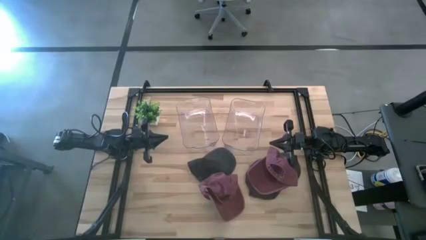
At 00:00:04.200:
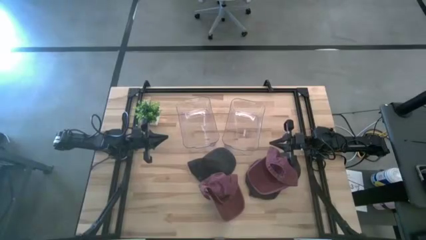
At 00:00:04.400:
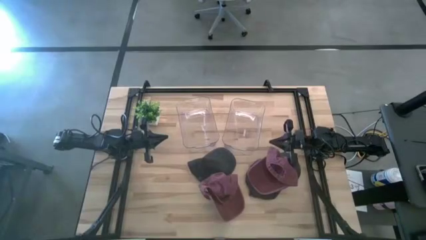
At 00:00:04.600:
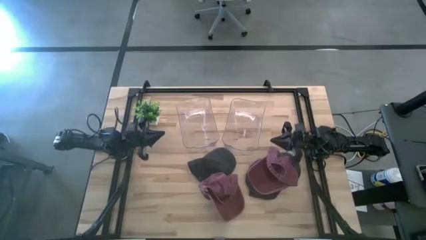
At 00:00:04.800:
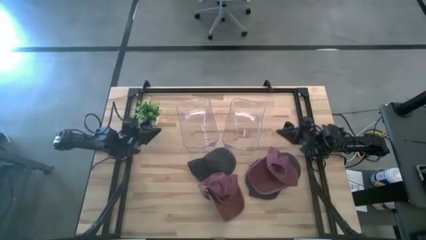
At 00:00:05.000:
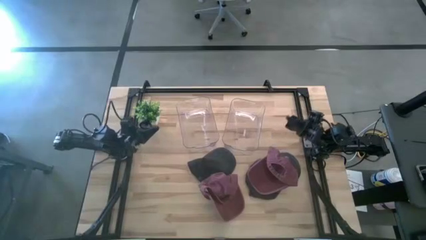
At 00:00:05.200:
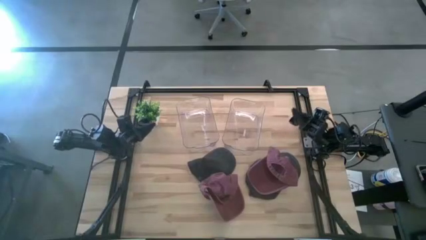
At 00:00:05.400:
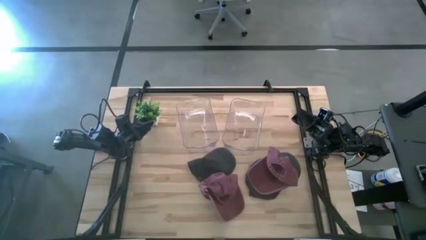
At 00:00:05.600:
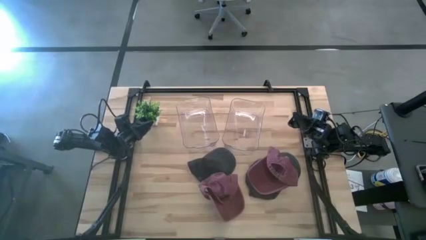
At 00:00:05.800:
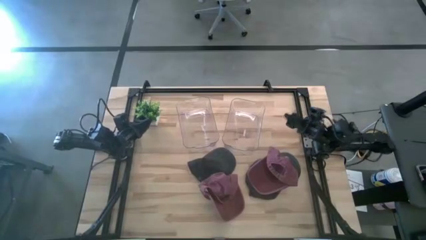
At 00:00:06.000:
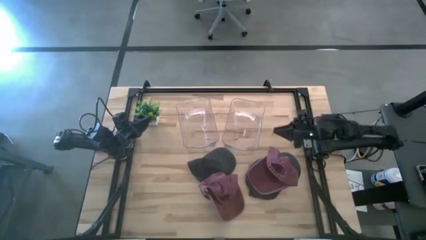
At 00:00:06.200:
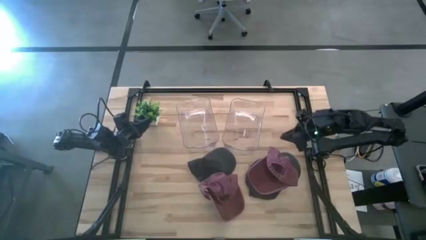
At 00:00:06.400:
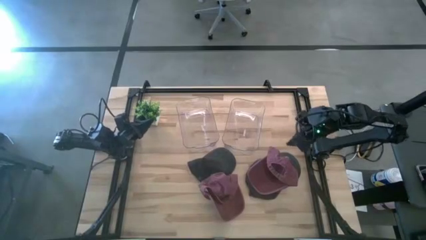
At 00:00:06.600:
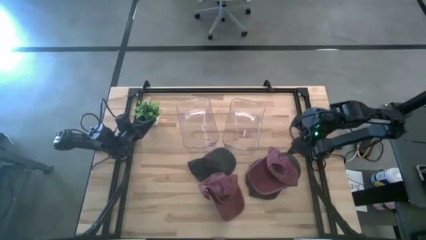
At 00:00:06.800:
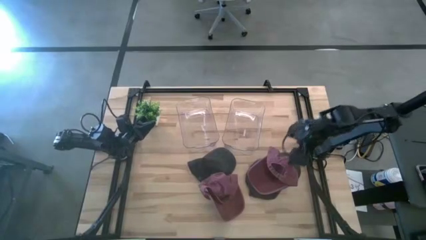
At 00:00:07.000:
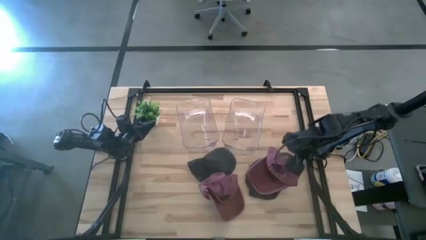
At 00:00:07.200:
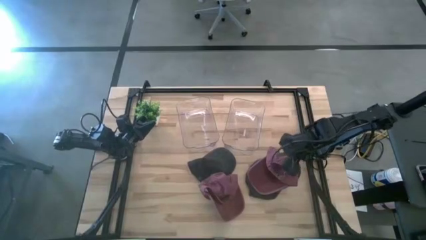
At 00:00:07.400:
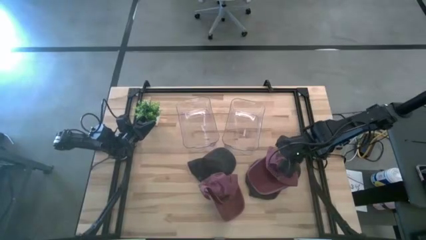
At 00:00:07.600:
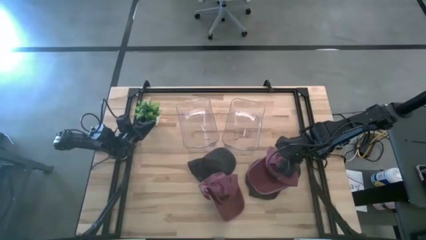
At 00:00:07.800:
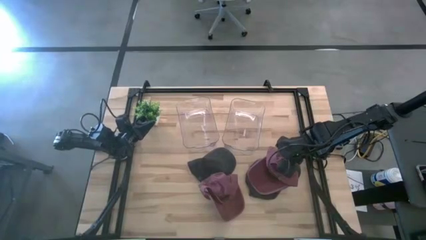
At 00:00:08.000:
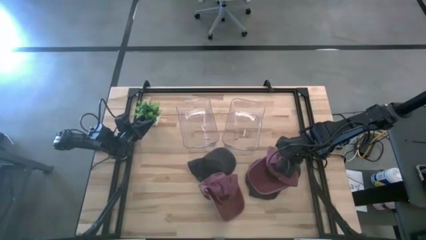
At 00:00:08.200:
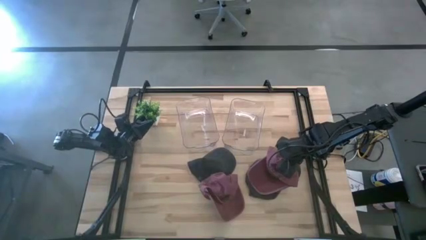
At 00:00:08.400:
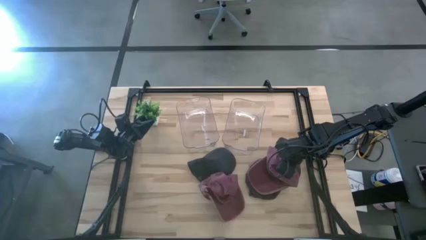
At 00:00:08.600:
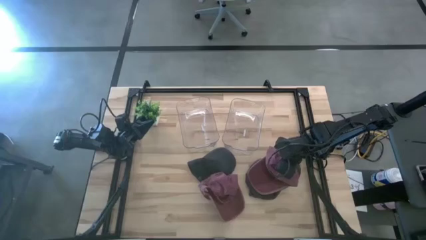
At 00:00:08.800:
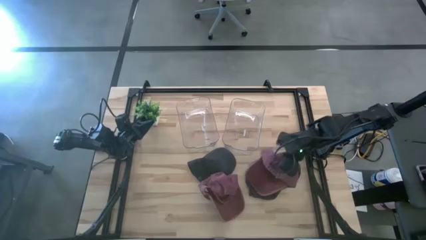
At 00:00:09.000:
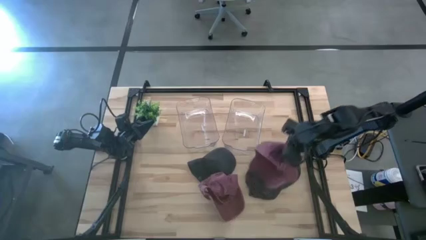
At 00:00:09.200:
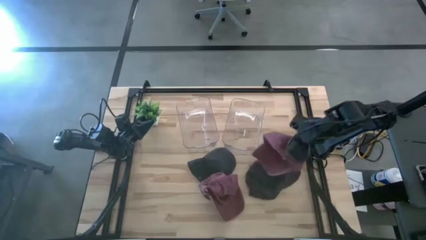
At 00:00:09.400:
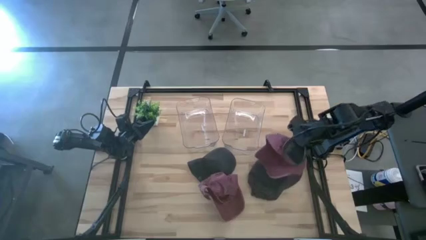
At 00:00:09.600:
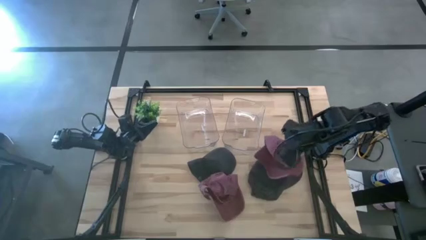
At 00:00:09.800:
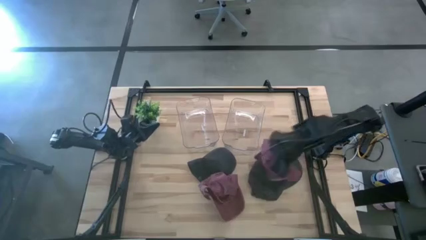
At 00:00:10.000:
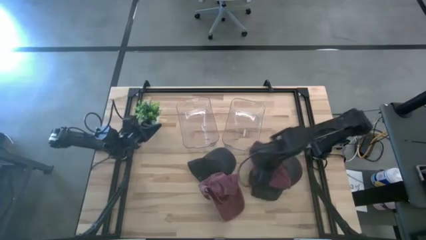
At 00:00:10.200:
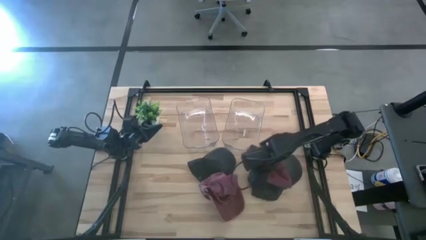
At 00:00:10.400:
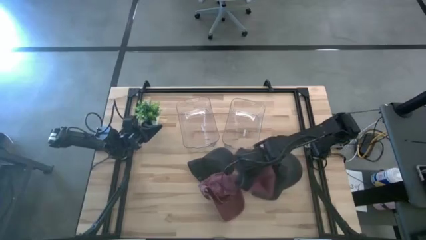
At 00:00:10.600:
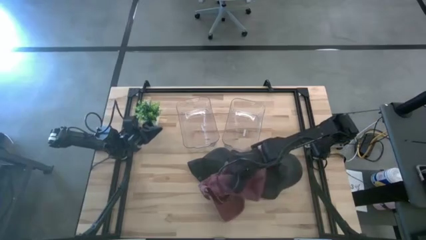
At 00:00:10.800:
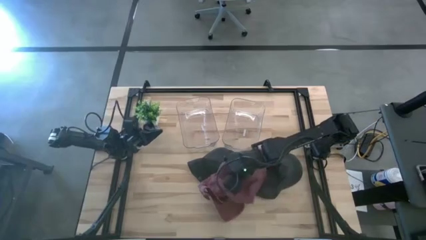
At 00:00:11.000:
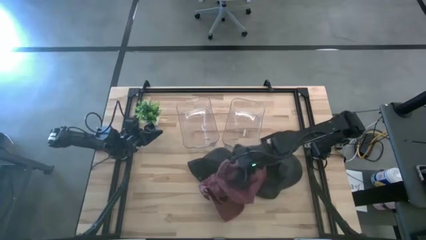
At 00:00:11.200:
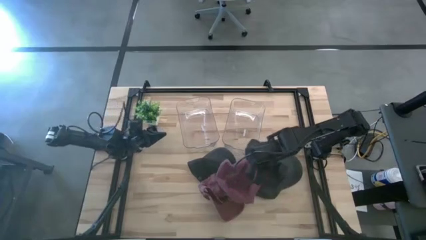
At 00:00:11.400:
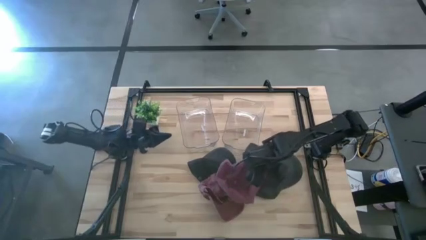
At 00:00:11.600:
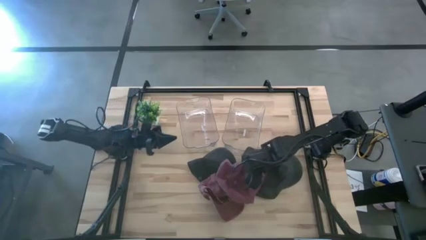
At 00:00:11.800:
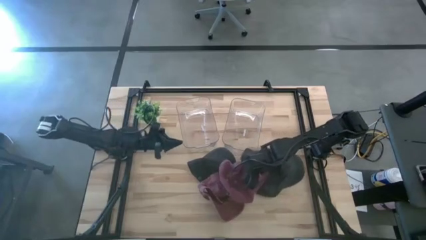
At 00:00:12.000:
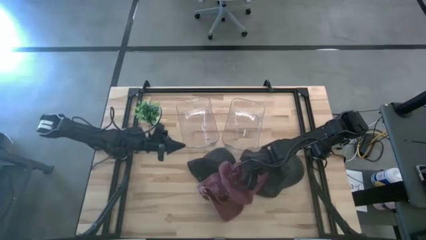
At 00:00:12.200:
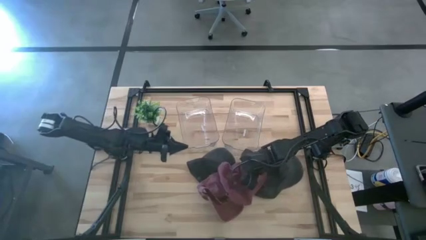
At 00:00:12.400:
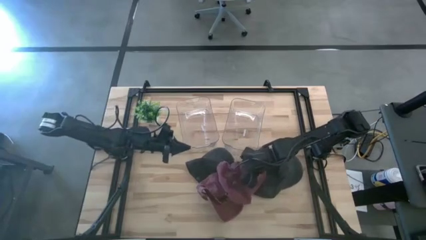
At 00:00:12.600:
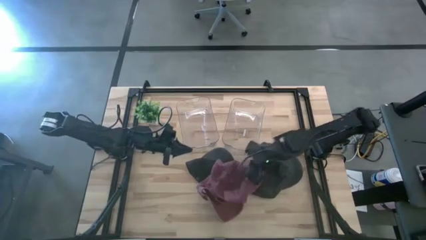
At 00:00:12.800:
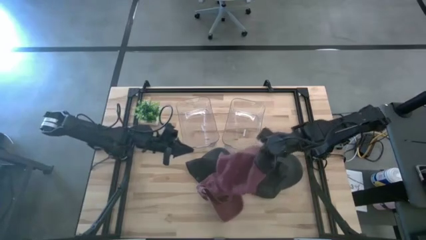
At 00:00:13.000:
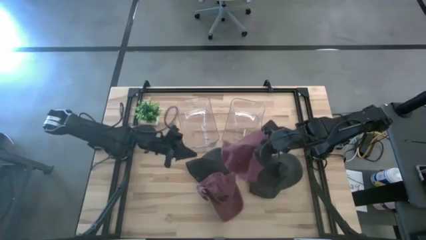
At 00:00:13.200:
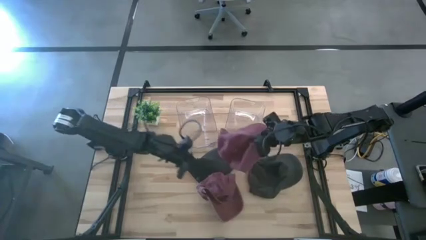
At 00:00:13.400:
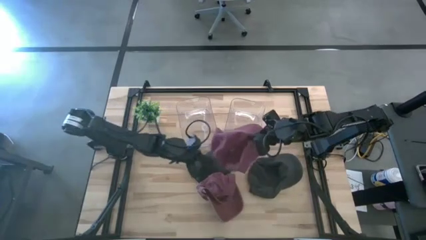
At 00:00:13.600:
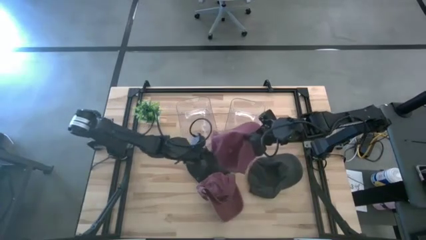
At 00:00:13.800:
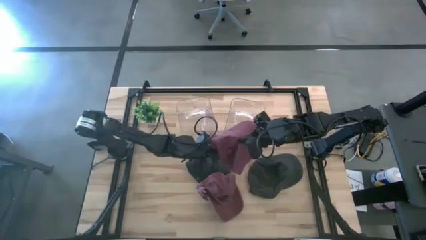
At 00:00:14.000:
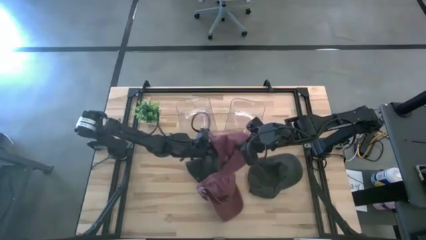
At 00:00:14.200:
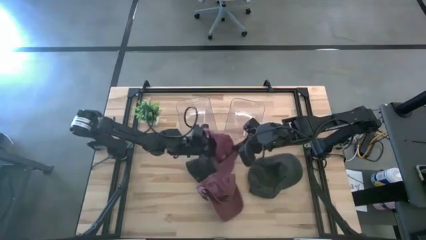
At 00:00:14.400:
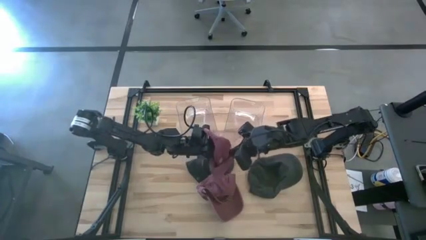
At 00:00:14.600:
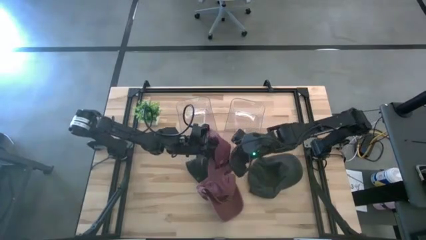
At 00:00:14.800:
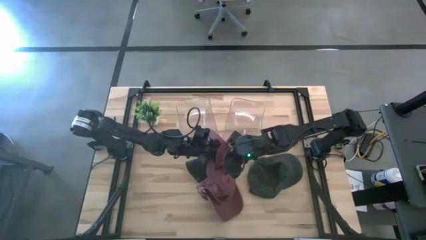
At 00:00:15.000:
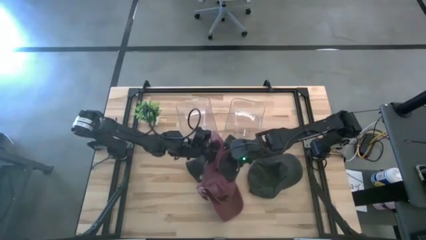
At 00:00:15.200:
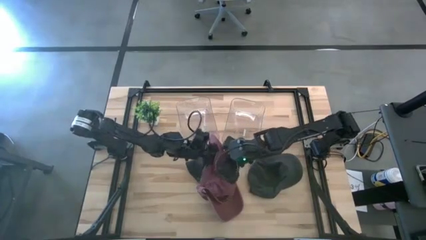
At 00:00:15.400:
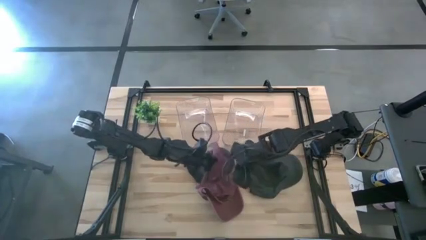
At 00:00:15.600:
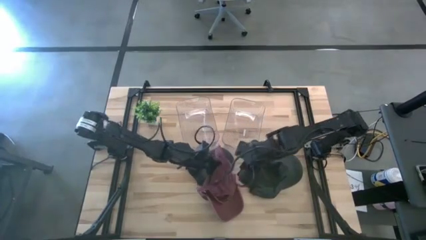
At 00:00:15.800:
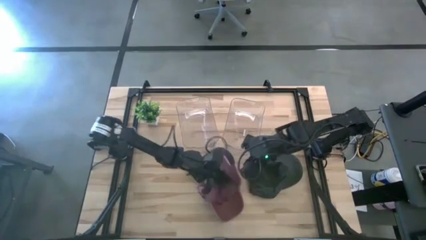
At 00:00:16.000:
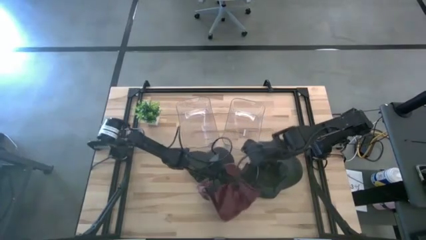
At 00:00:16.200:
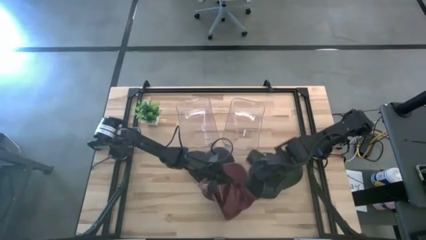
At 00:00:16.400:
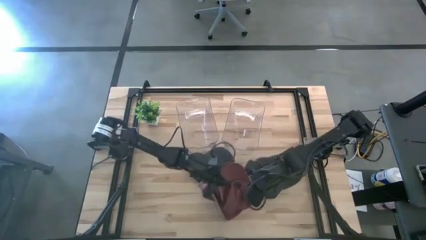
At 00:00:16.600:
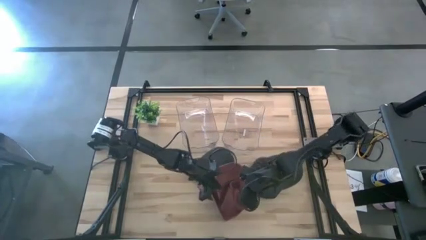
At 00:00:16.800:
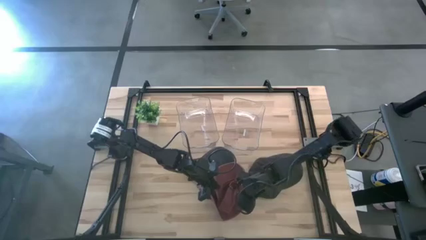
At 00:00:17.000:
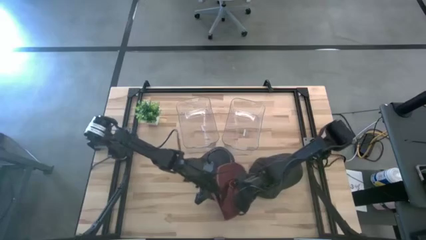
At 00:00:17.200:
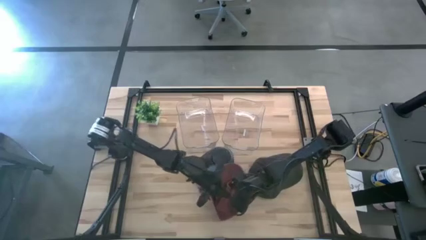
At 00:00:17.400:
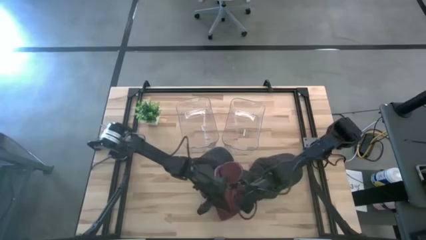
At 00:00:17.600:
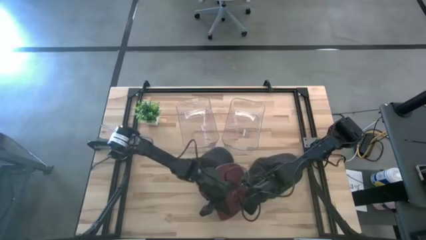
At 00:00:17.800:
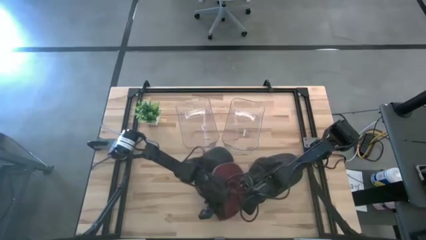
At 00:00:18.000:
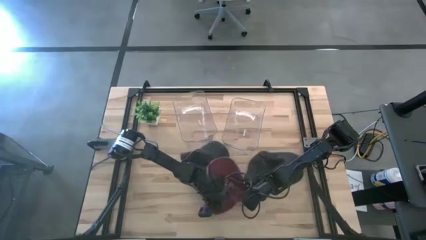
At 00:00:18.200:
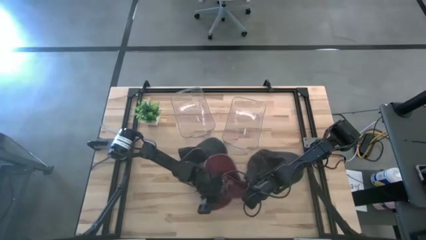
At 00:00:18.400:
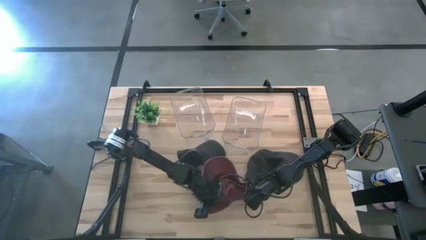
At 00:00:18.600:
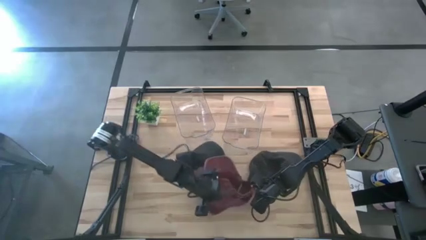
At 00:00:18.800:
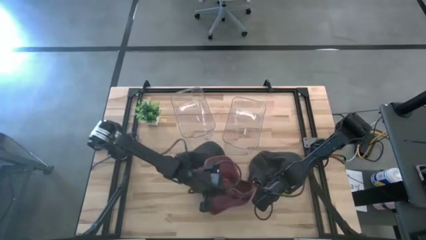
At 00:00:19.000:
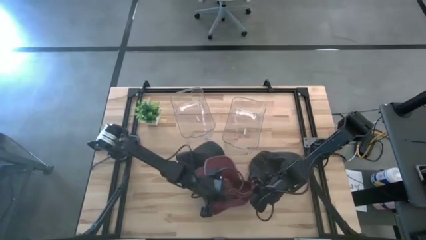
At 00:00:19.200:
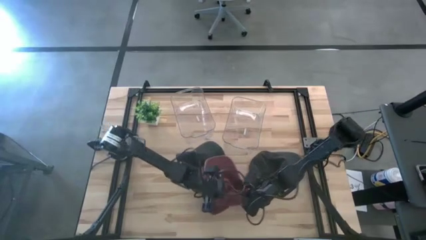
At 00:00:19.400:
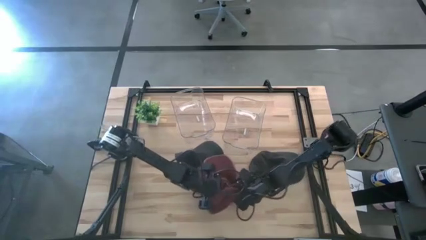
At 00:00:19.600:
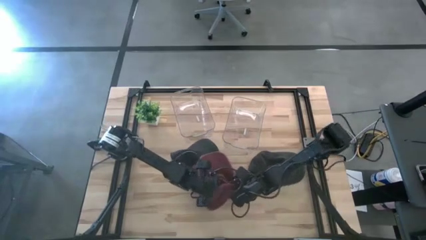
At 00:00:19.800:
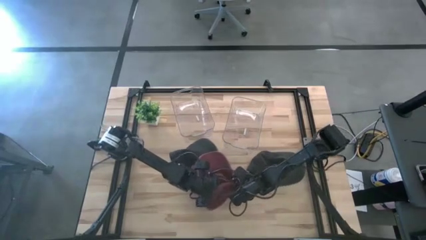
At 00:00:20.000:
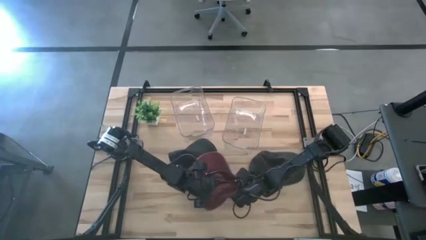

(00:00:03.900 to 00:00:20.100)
Task: Pick & Place hat
Put the right red cap into the right transparent bin
